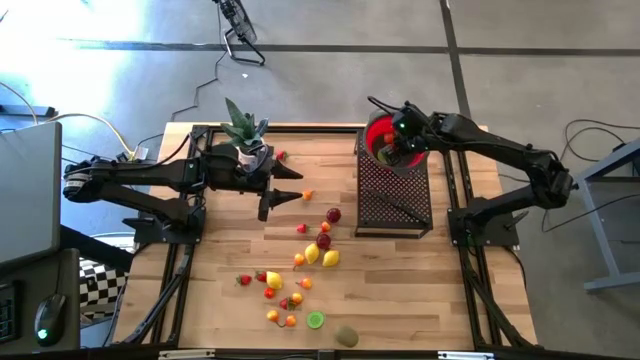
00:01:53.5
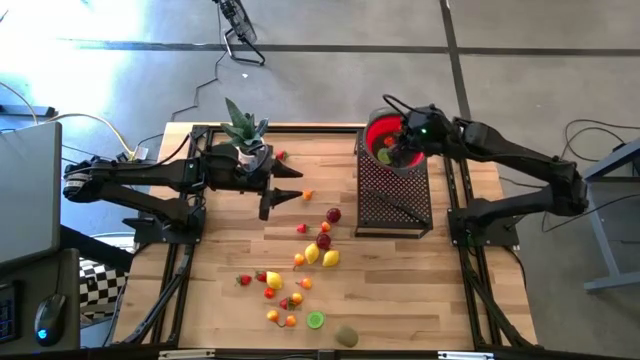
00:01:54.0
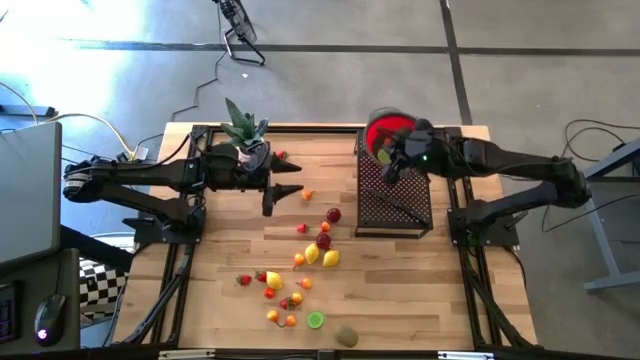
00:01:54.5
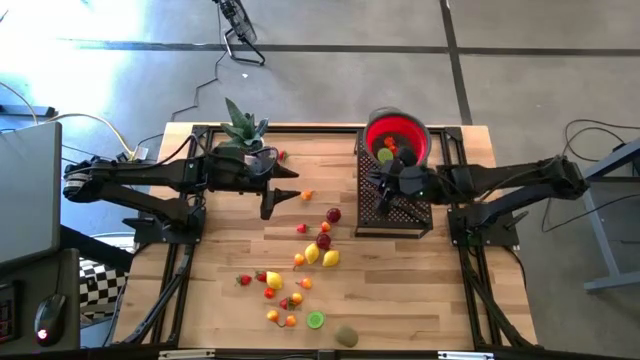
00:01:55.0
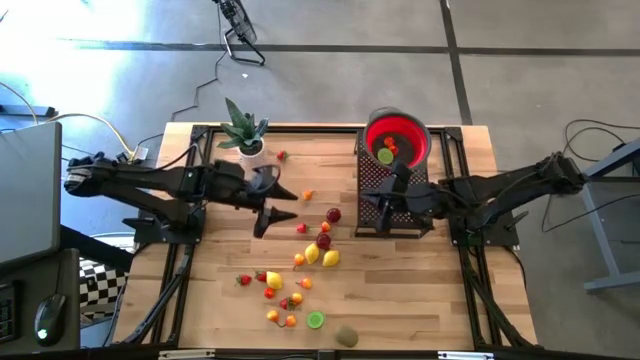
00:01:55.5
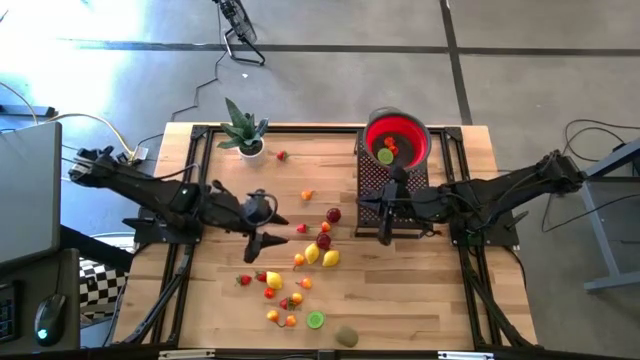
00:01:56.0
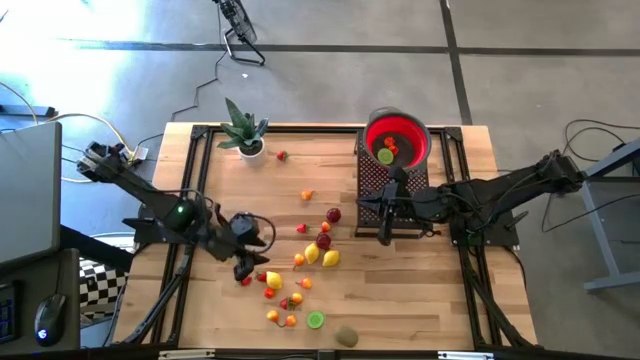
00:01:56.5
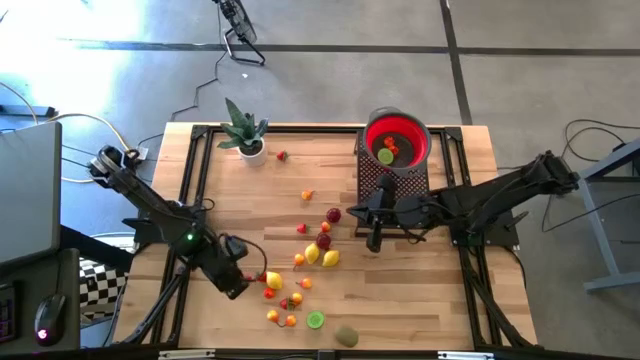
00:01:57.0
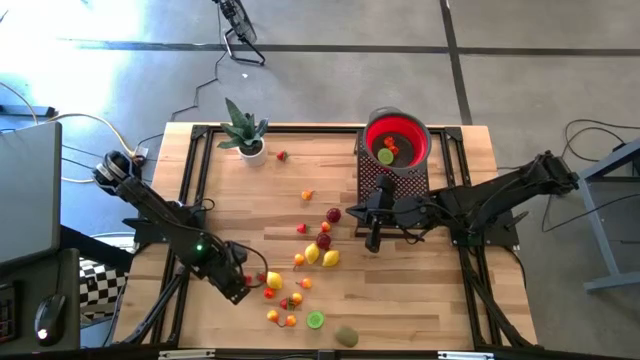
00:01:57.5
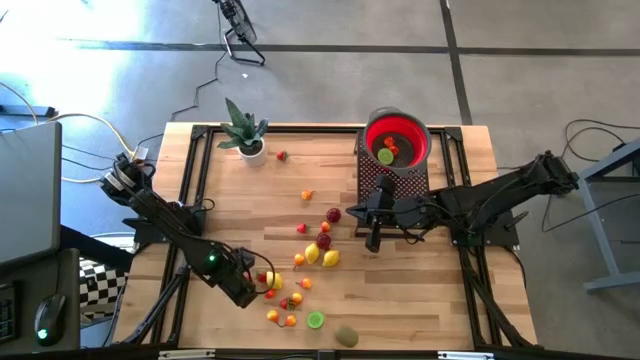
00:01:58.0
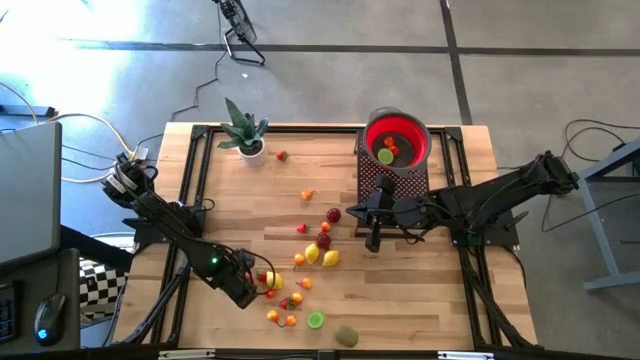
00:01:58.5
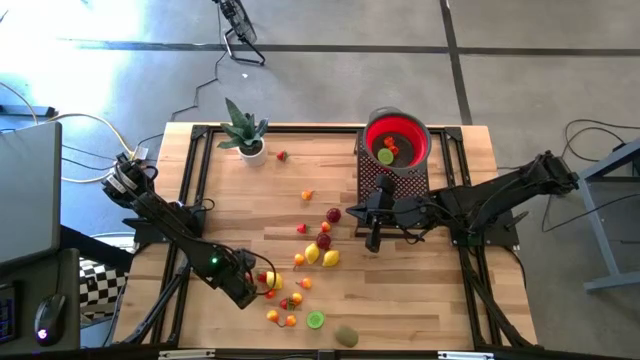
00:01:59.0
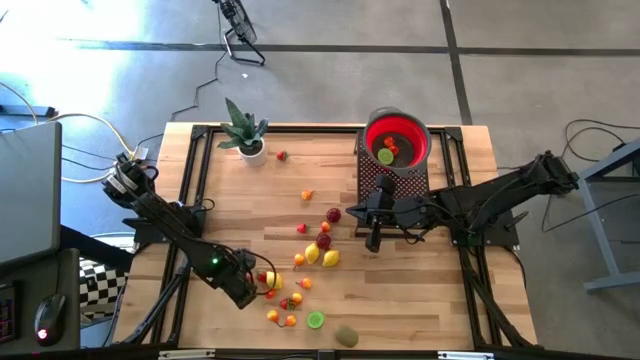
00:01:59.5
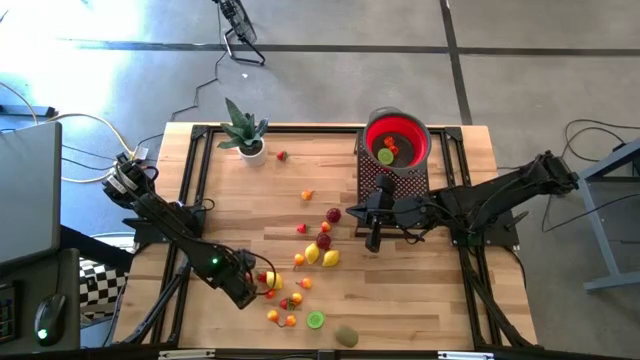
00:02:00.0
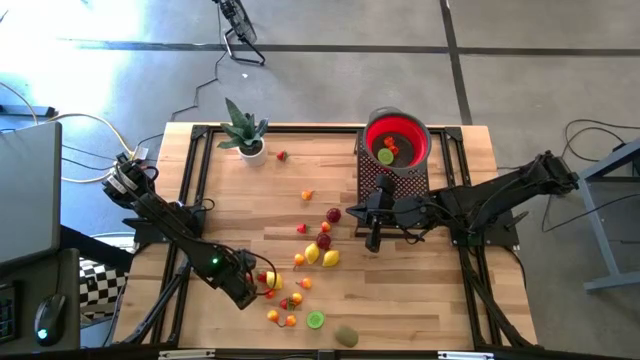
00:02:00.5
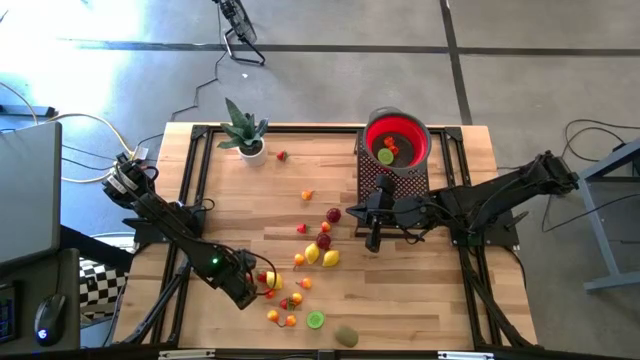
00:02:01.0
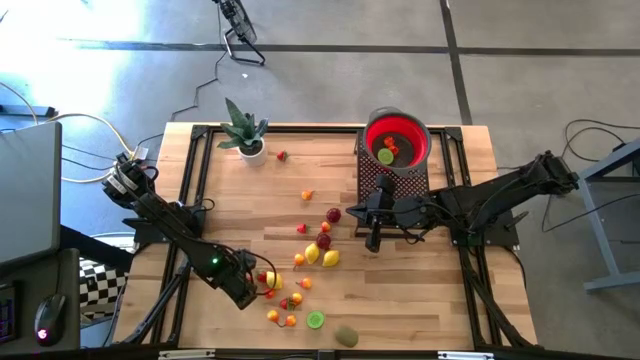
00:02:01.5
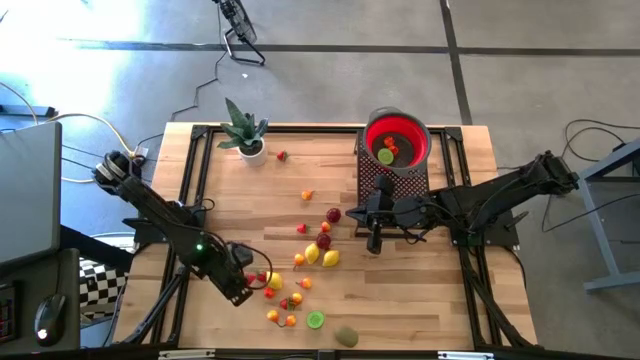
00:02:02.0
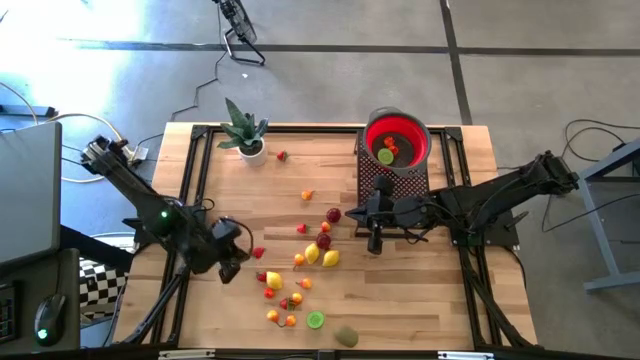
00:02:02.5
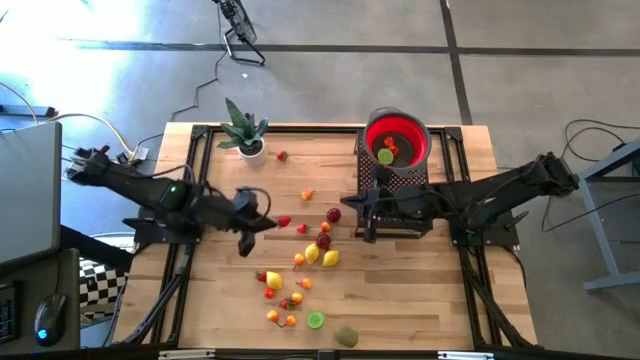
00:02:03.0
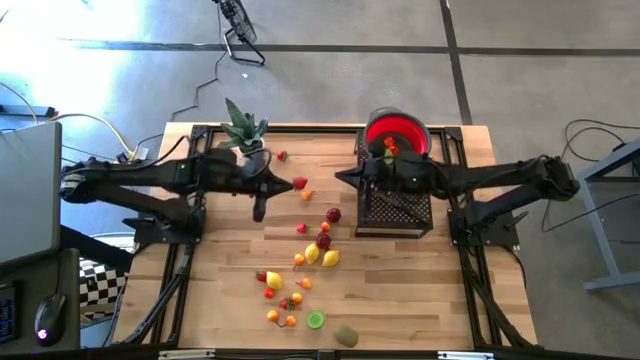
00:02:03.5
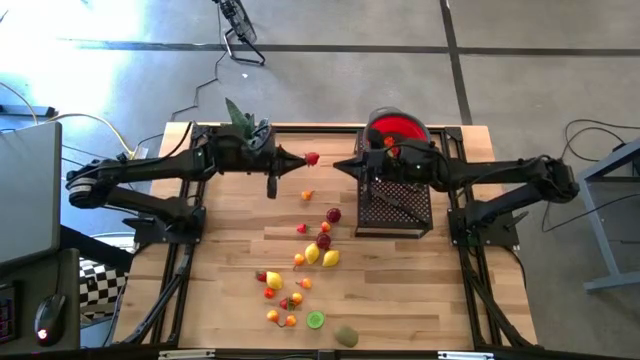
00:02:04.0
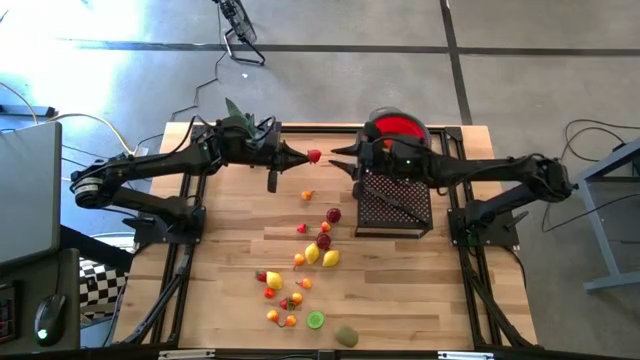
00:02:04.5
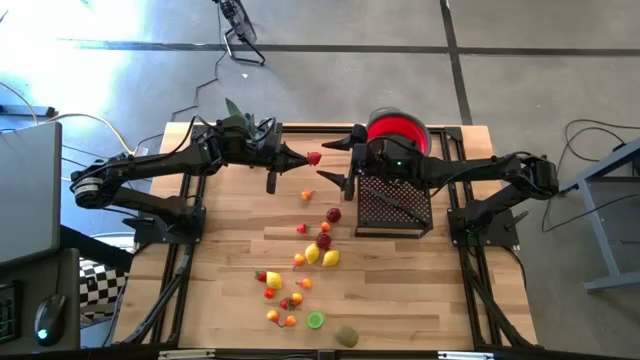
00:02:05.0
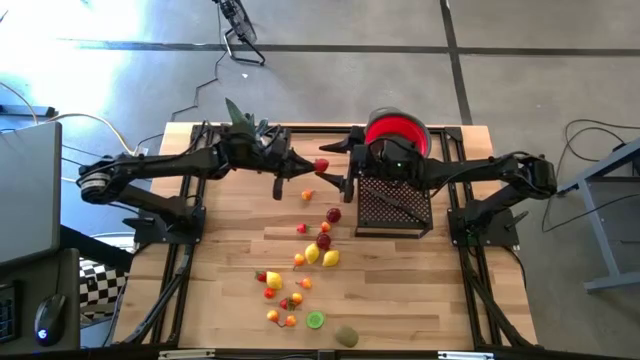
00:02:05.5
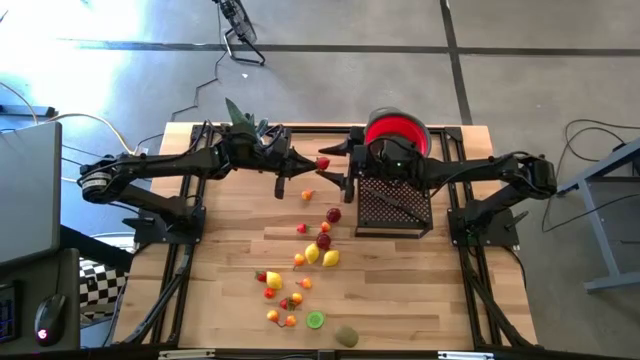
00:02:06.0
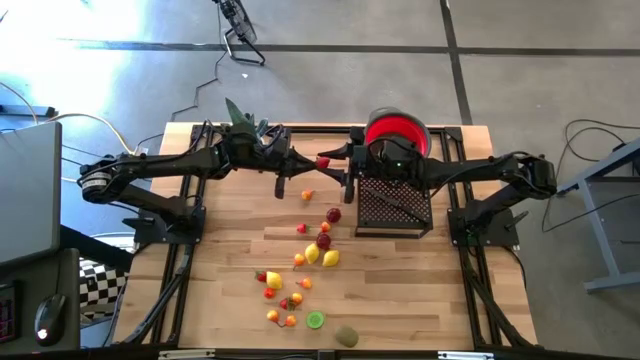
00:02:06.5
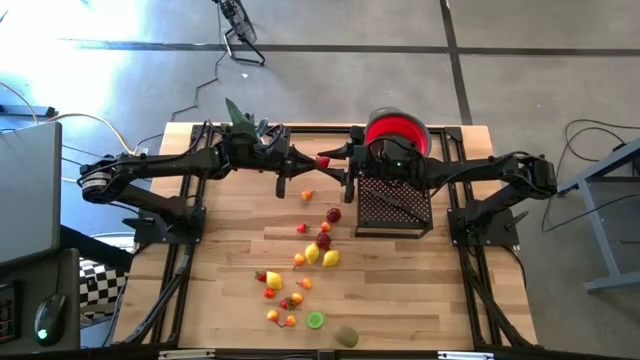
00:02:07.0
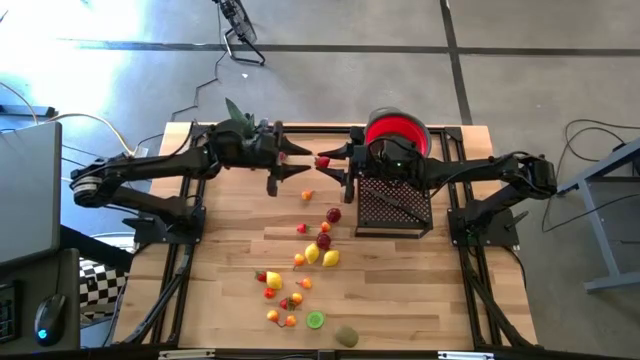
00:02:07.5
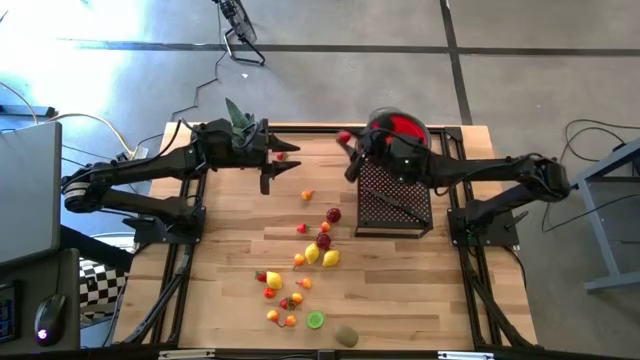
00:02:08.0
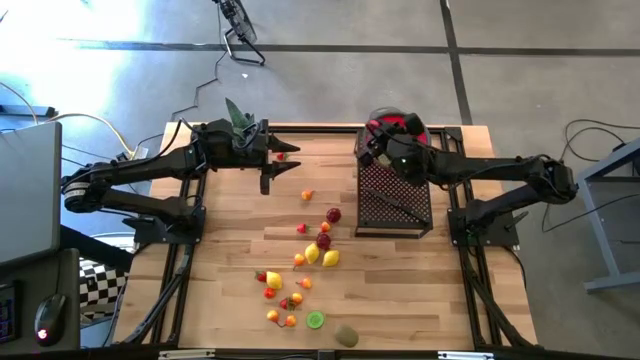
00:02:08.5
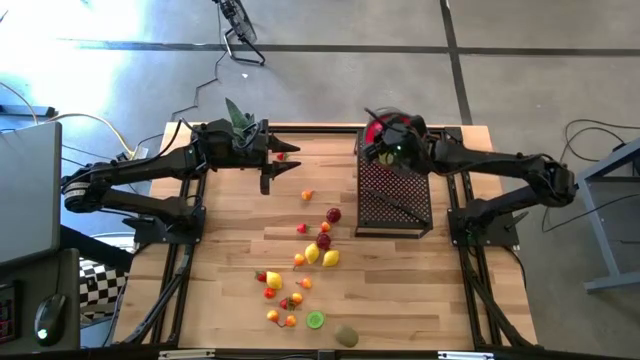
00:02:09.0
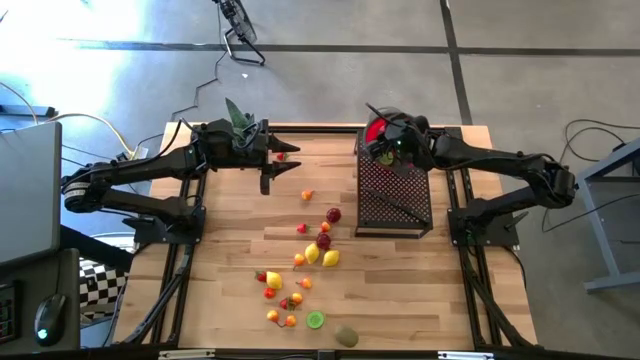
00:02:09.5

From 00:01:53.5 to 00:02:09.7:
Task: Pick & Place Fruit
Put the strawberry into the strainer bowl on the shelf

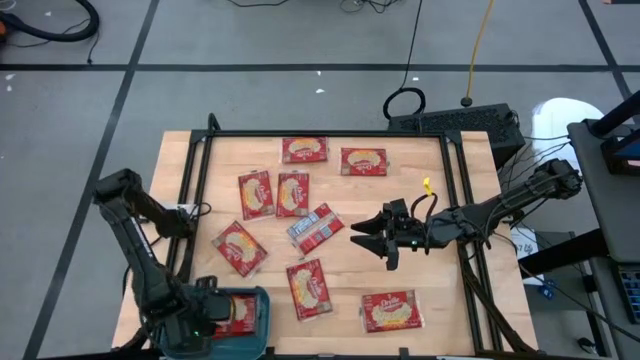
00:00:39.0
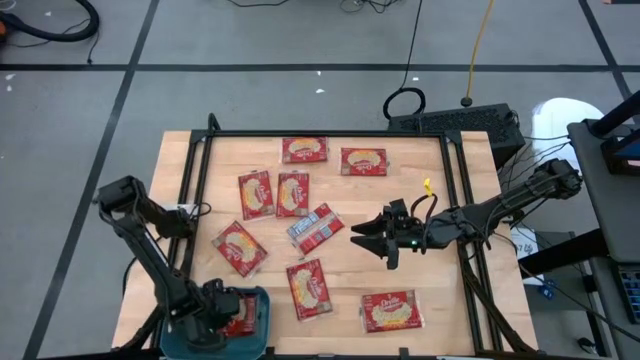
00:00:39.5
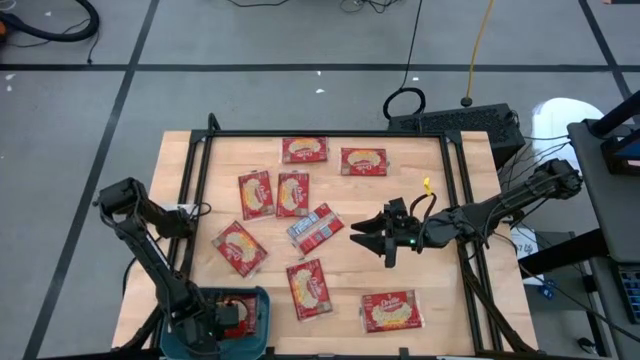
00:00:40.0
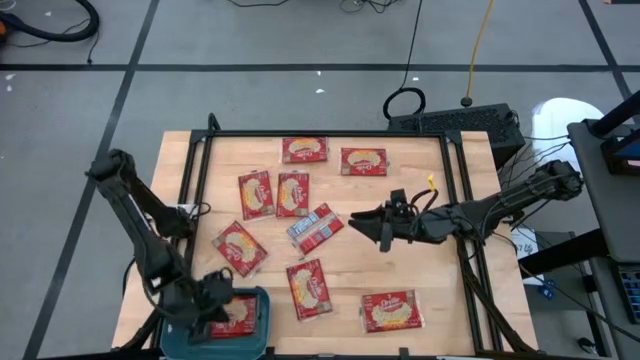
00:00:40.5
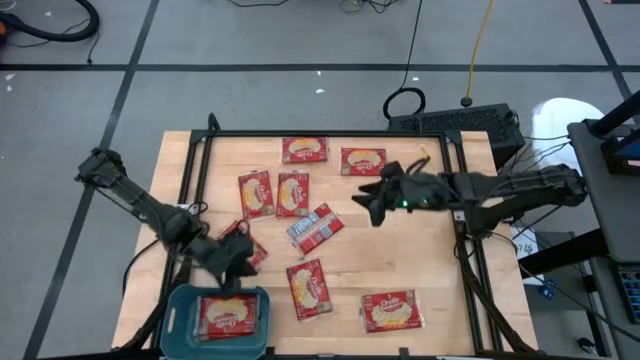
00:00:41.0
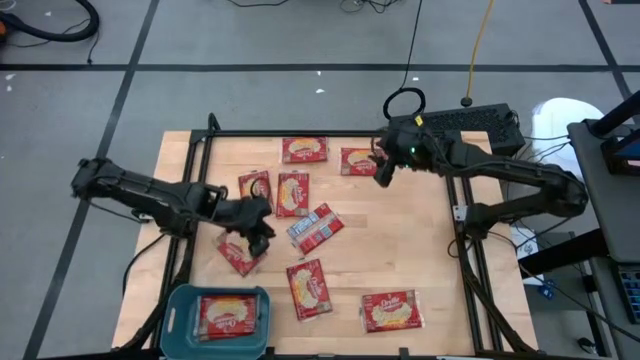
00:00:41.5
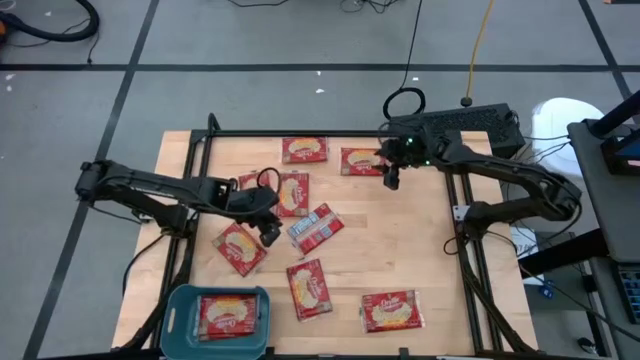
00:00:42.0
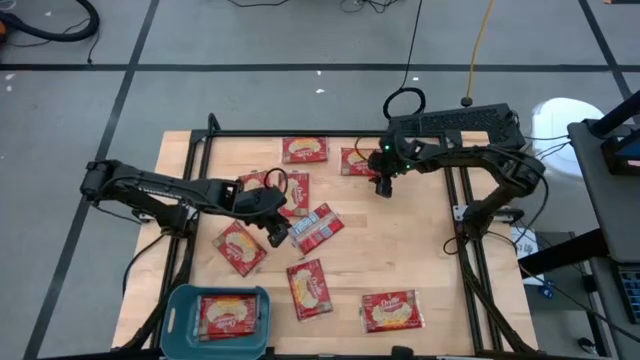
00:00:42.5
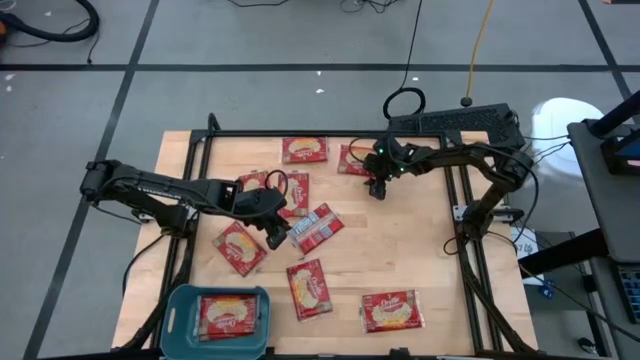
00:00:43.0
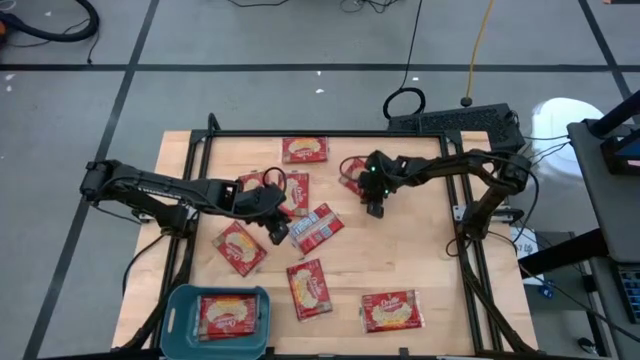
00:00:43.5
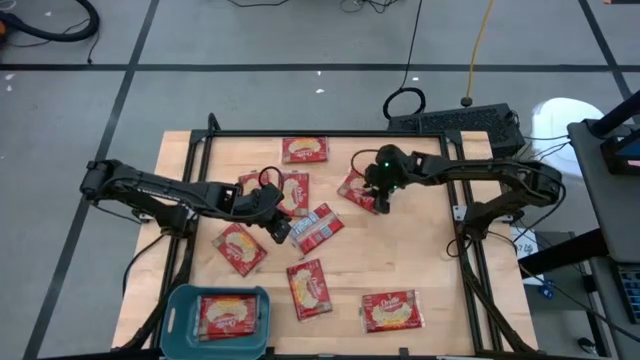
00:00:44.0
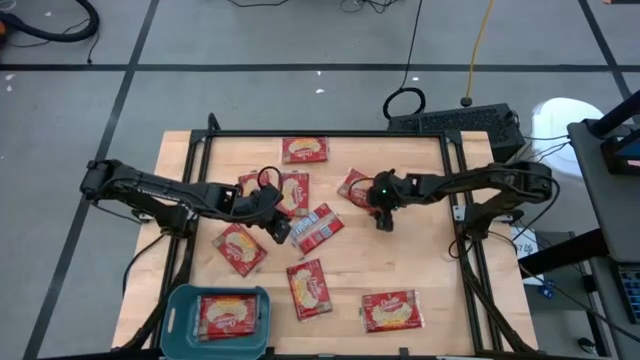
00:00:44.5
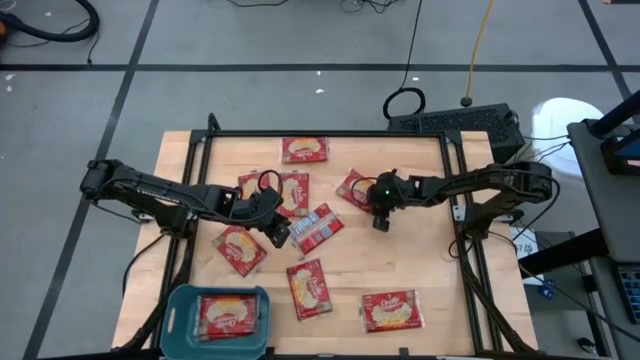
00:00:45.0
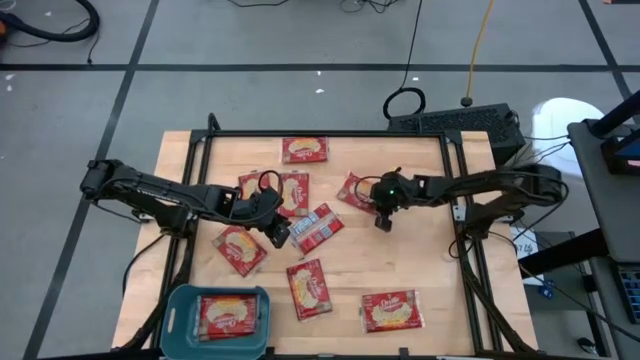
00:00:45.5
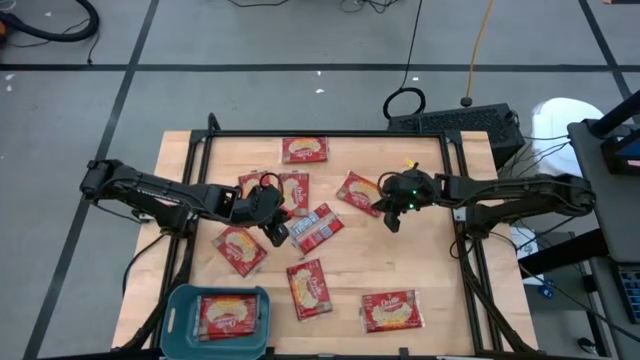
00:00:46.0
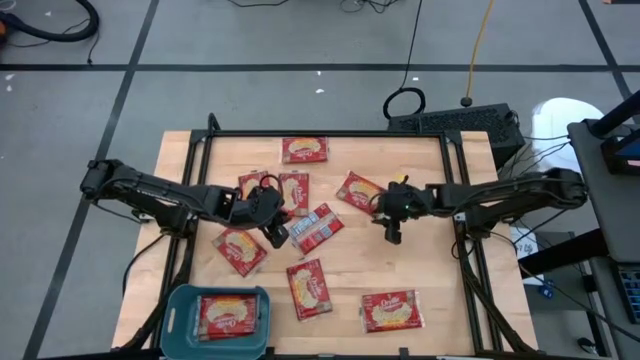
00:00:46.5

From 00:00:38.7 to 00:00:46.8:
Task: Sort popcorn bags into baskets
Put the popcorn sachet into the bin
